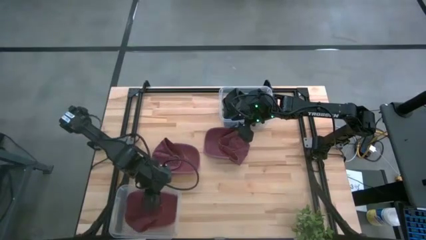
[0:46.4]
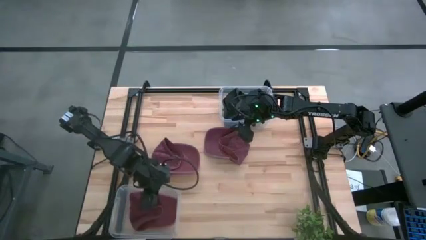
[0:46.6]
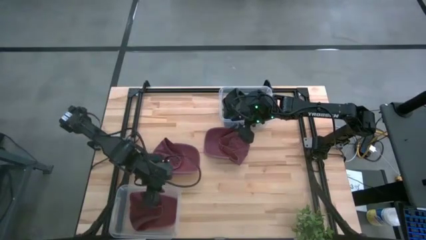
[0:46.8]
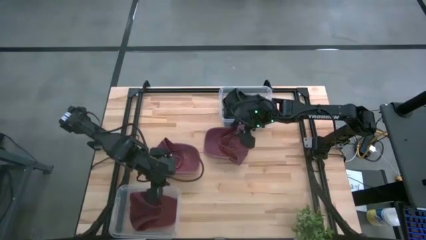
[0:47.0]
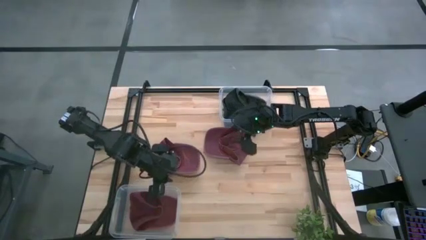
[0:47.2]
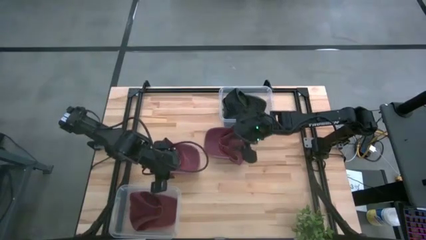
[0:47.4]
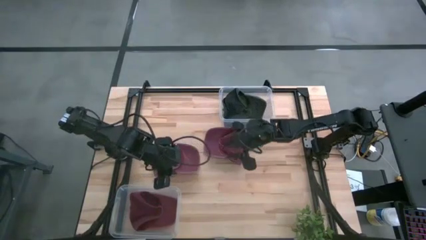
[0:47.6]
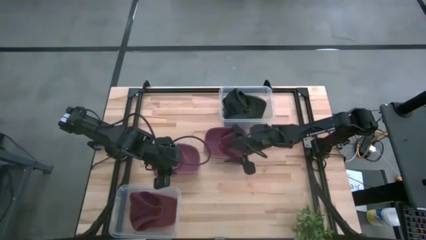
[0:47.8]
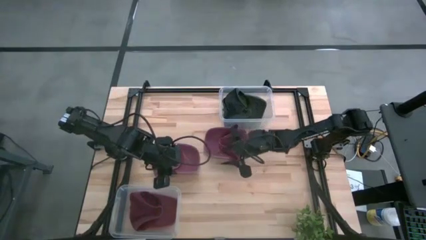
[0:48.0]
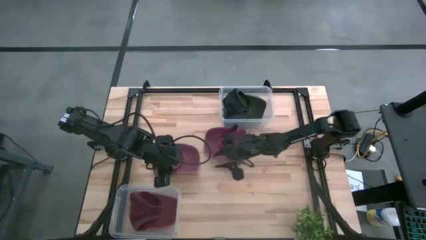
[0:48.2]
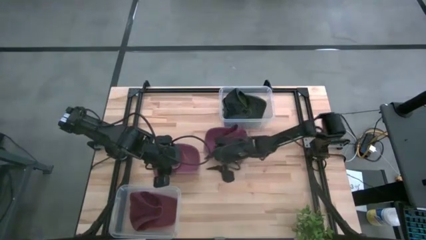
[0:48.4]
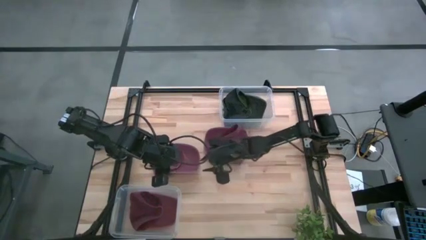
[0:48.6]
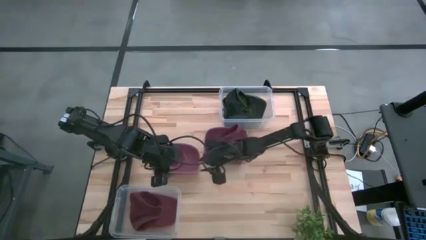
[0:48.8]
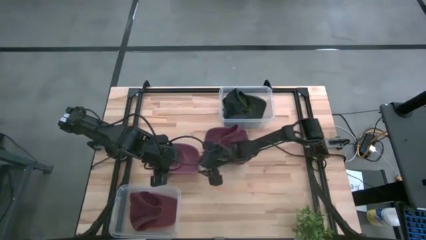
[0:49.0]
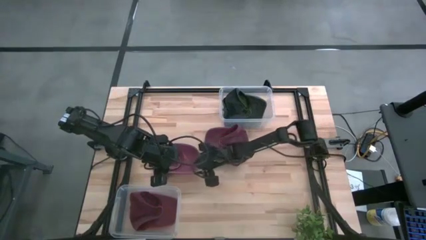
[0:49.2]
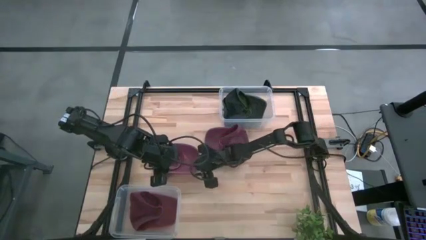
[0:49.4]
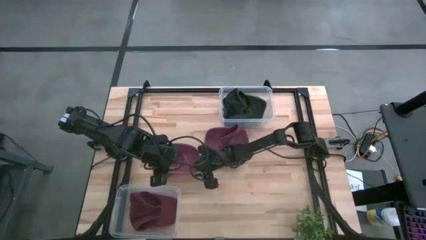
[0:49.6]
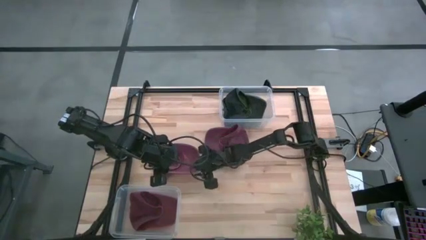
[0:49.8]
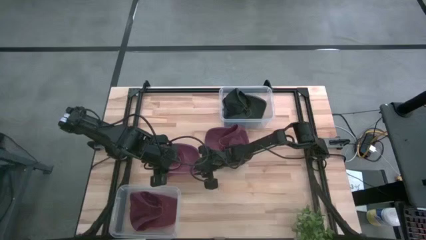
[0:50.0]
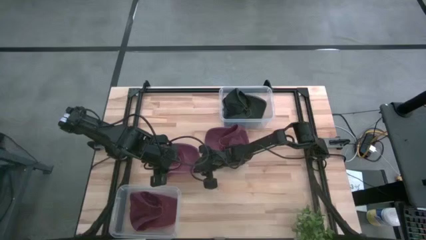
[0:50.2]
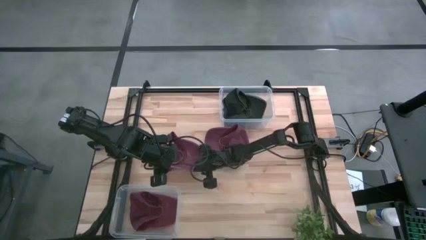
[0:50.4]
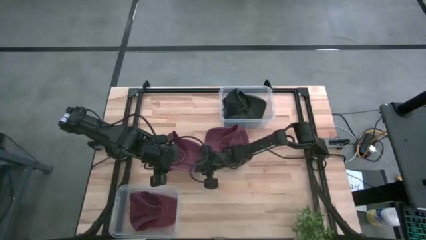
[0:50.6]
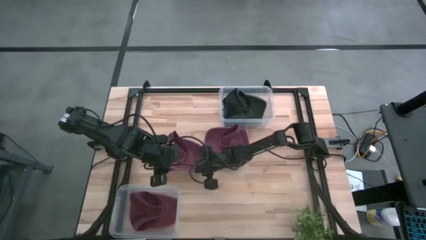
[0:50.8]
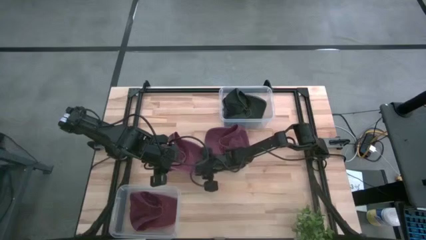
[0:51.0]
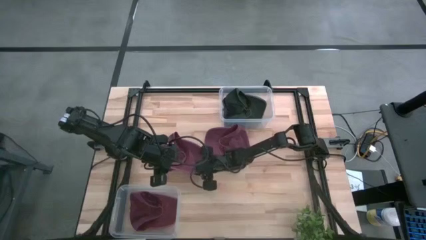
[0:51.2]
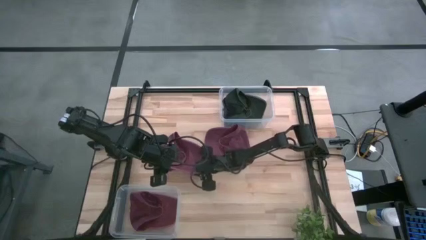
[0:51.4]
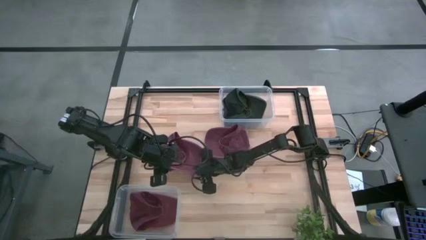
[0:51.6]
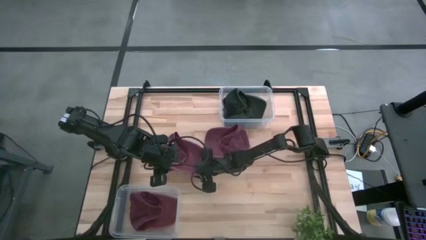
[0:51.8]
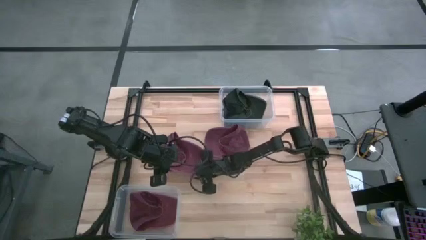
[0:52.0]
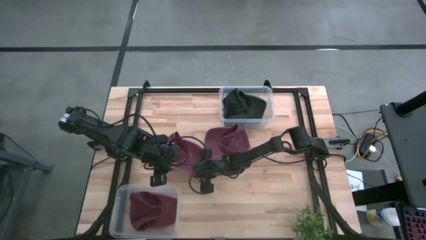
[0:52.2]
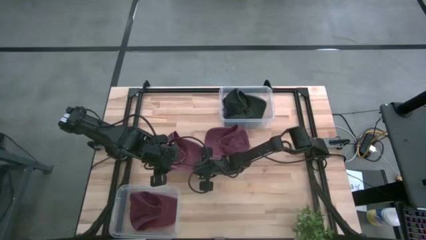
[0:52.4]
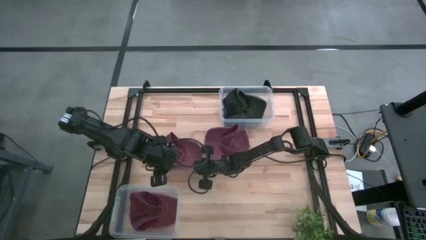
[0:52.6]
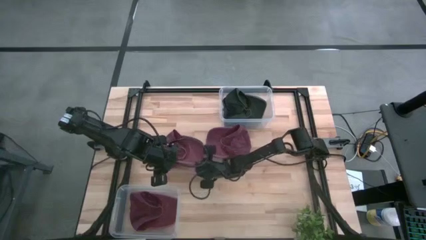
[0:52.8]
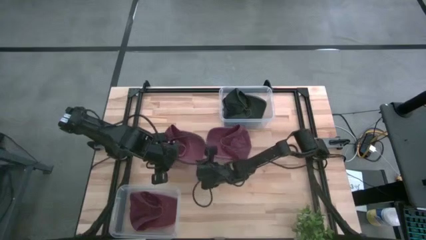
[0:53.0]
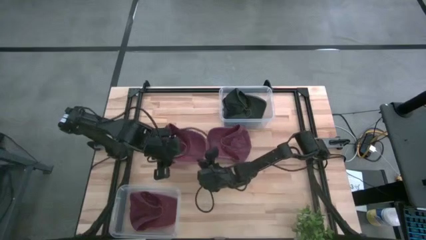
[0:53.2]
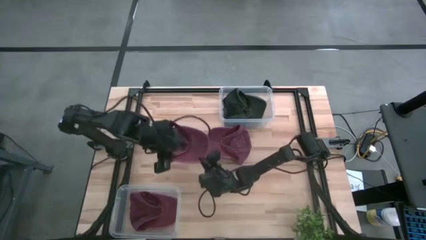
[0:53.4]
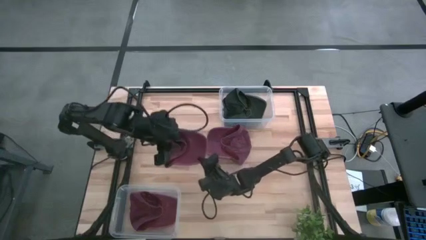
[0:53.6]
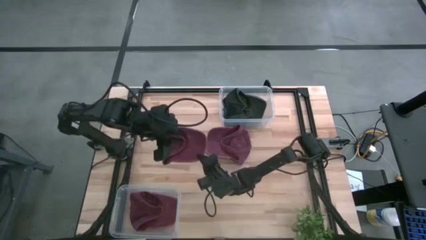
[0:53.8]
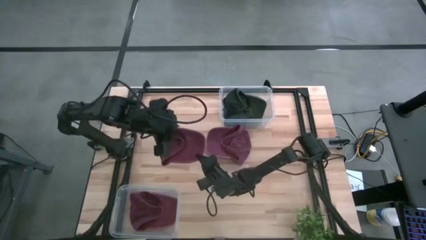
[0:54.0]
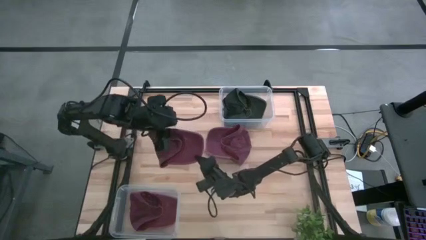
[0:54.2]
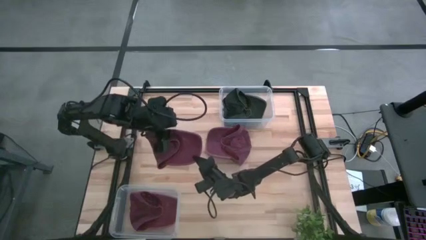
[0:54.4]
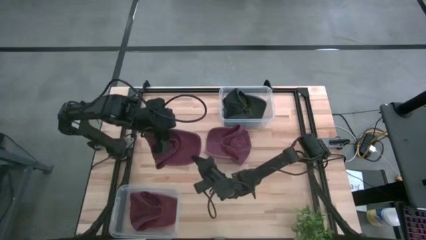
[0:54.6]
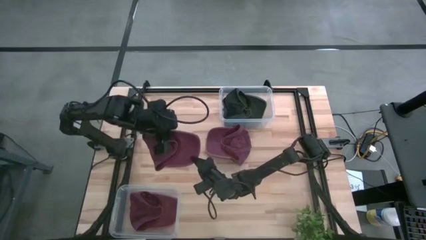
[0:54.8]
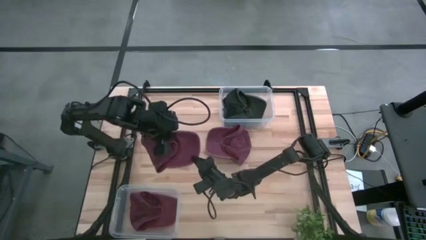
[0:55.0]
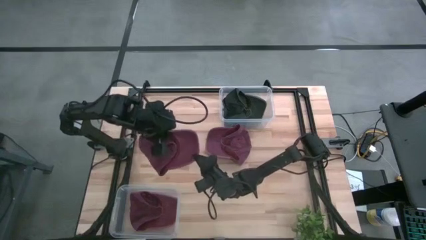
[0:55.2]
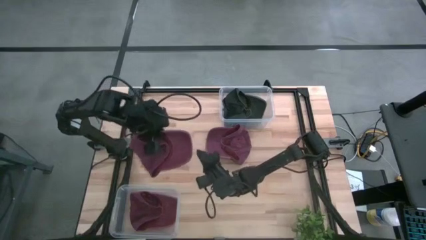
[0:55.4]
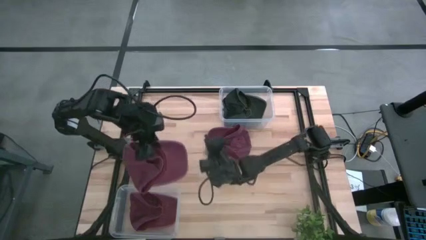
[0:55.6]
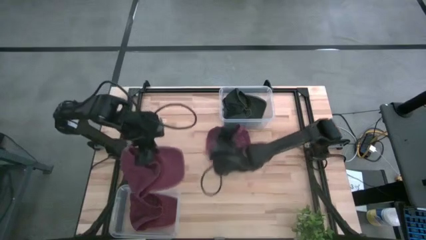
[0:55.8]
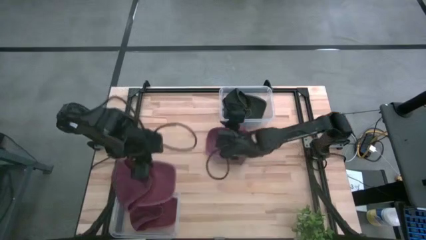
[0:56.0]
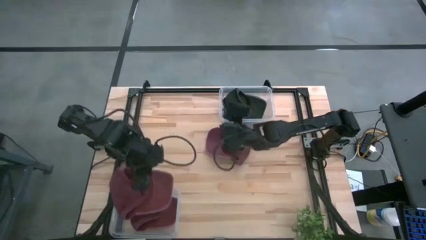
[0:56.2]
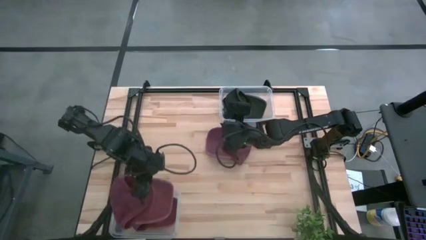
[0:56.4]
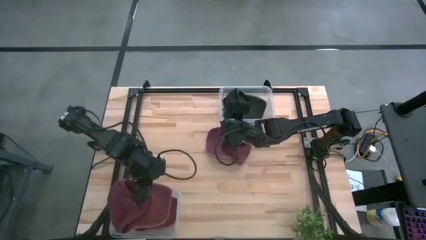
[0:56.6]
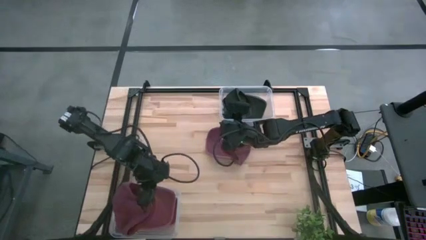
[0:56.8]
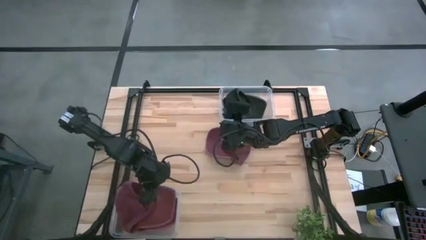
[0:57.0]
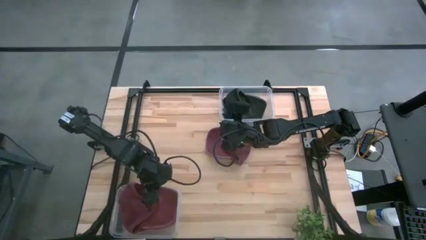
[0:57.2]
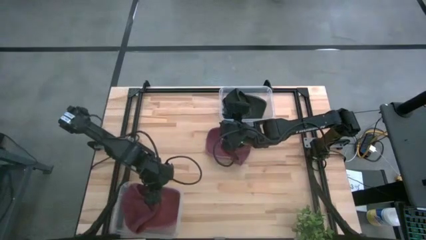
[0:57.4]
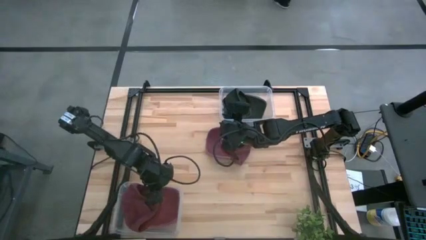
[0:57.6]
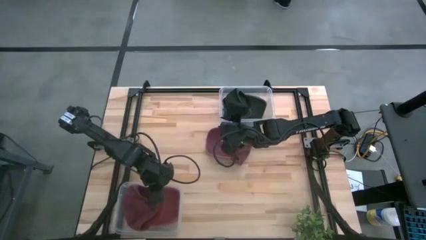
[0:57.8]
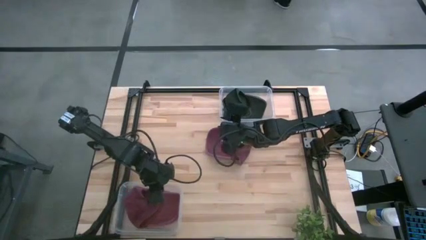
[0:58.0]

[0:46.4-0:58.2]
Task: Pick & Place hat
Put the left red cap into the bottom transparent bin

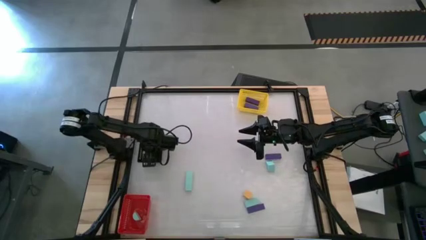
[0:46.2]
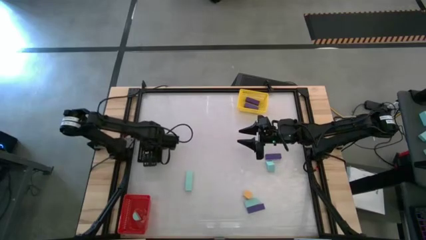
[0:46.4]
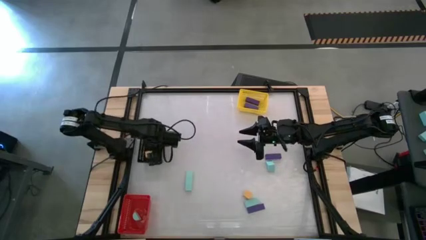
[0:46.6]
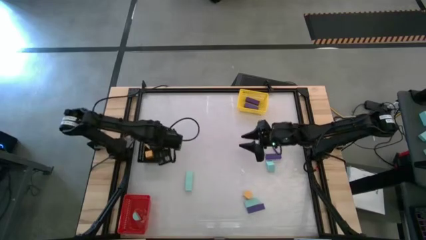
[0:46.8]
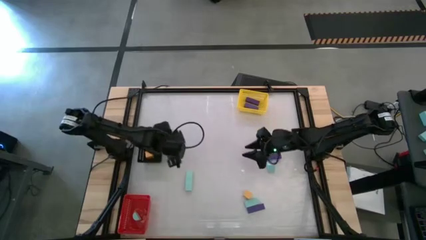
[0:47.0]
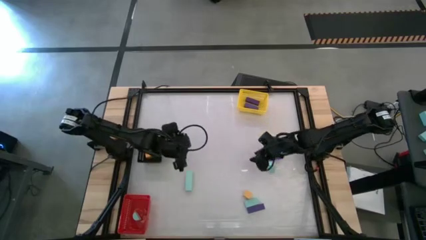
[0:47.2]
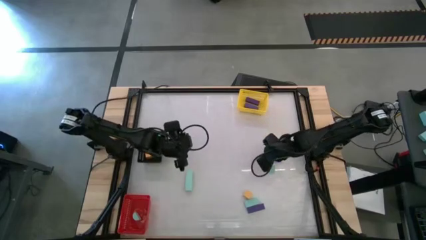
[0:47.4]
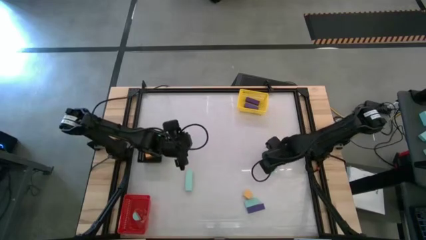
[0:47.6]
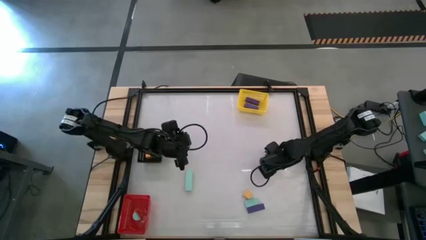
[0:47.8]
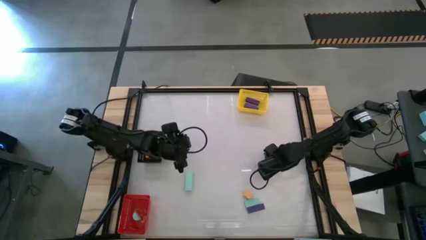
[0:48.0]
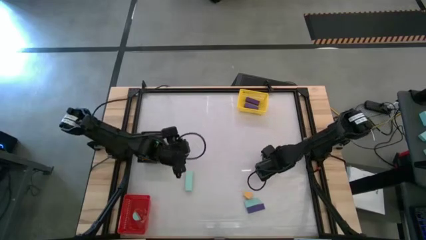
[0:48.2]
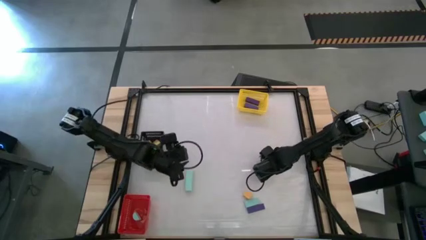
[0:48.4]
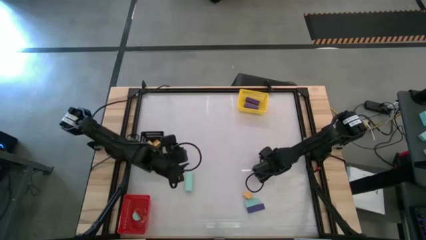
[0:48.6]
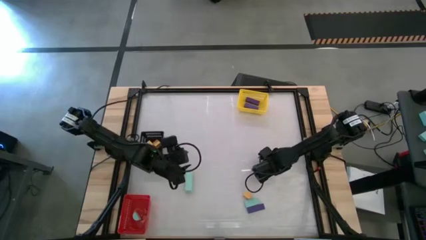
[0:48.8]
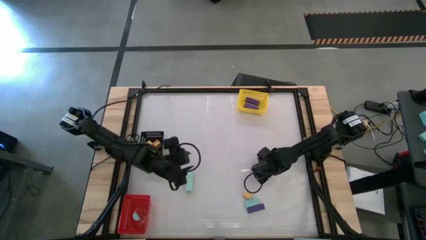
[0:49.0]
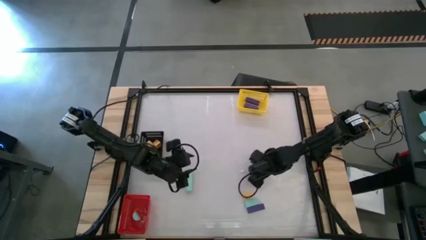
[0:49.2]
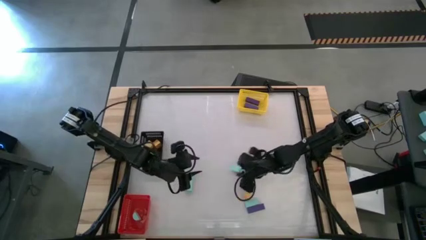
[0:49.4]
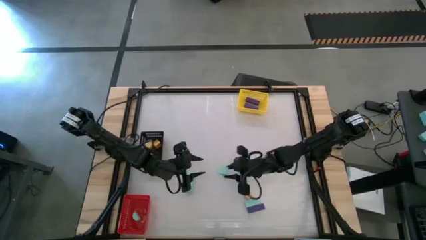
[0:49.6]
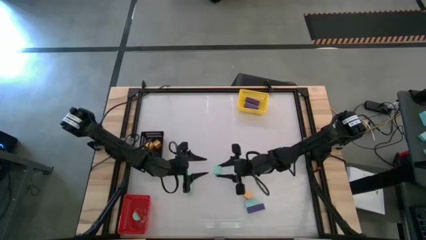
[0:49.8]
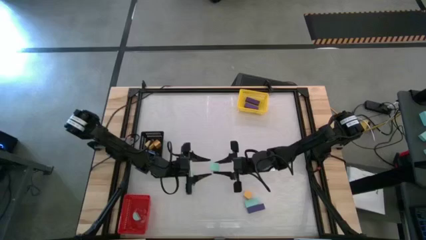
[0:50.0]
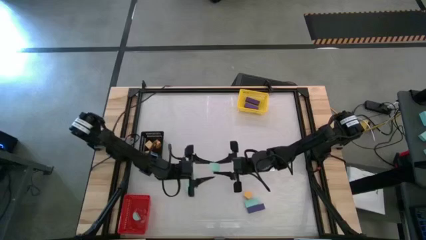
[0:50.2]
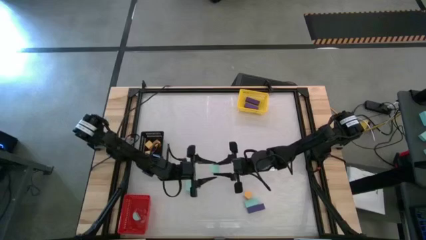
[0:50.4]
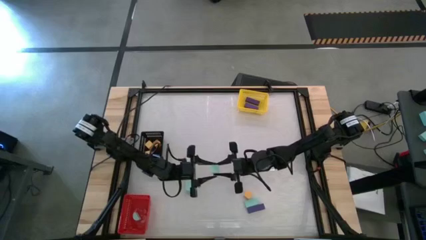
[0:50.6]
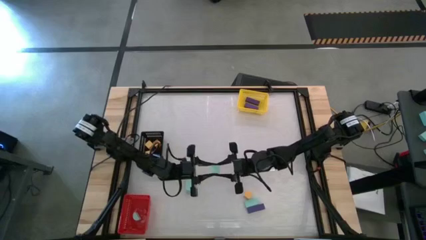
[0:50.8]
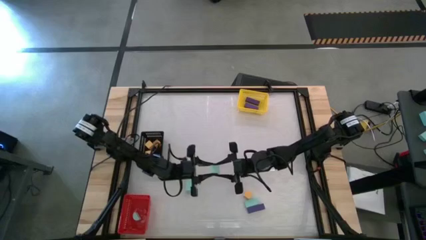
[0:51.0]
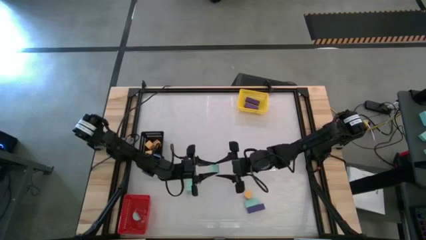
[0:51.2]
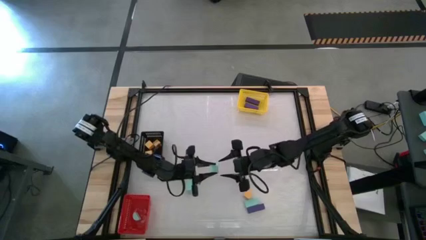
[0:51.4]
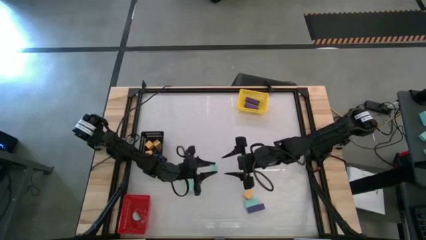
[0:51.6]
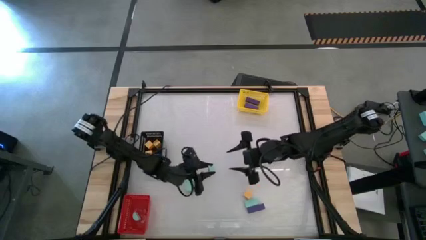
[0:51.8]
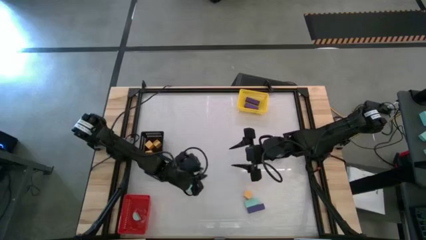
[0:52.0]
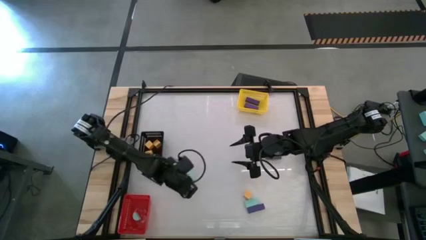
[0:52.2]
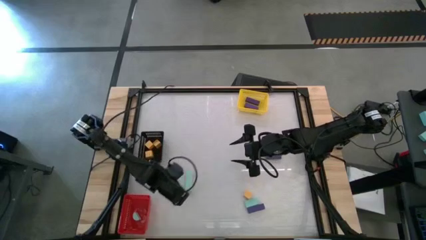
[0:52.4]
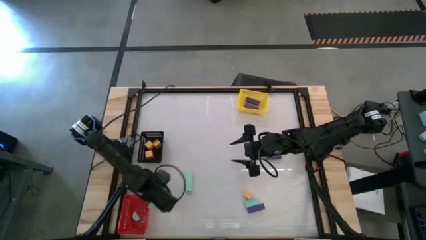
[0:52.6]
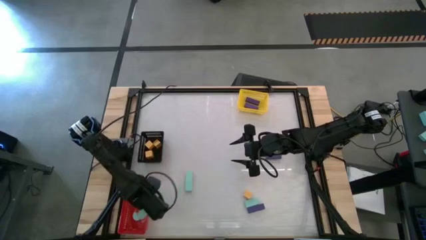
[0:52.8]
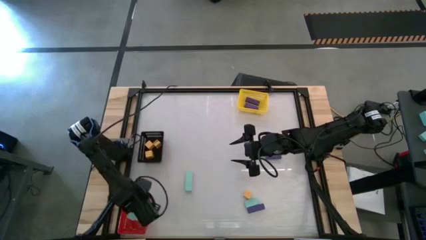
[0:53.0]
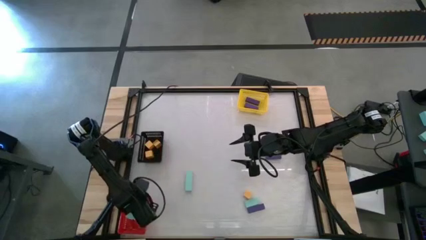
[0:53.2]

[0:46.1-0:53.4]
Task: Sort & place blocks by color
Put the light blue block into the red bin
